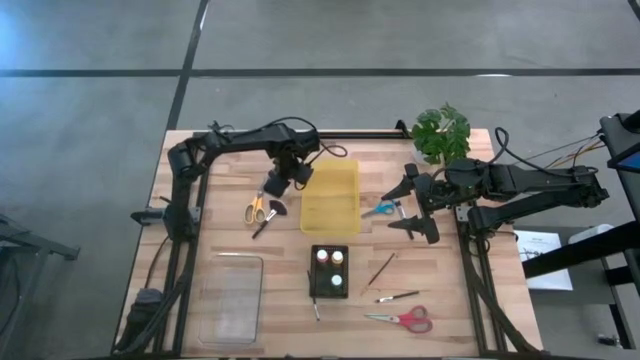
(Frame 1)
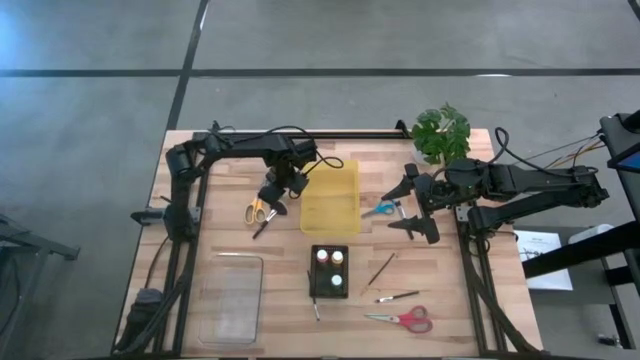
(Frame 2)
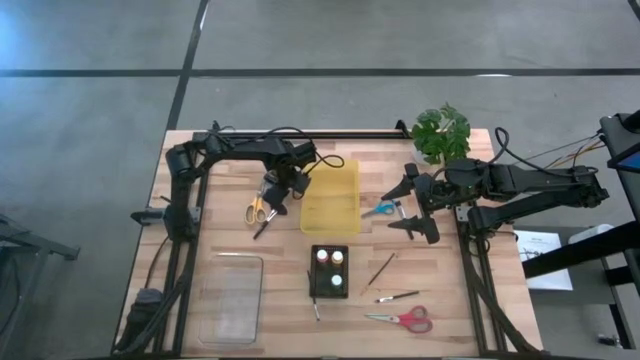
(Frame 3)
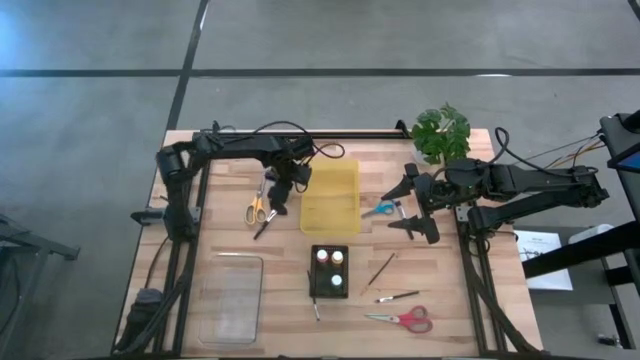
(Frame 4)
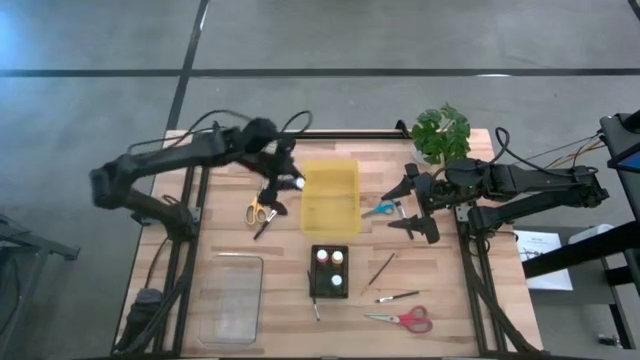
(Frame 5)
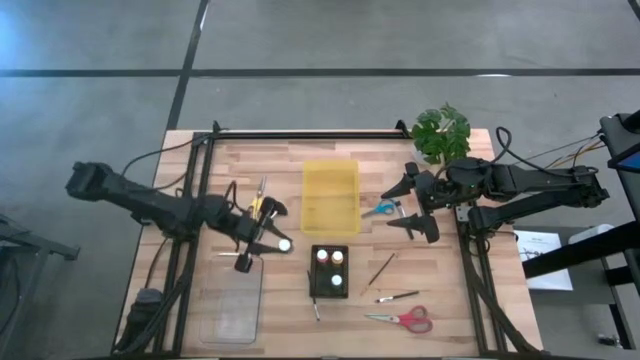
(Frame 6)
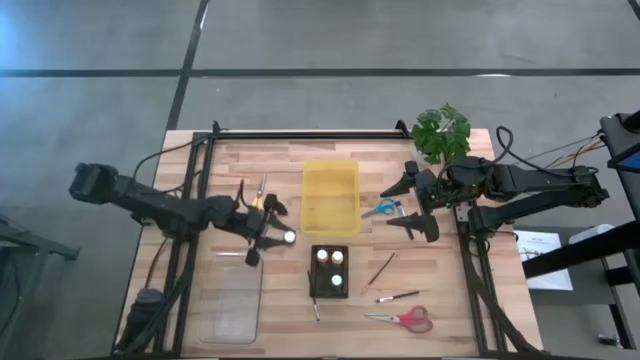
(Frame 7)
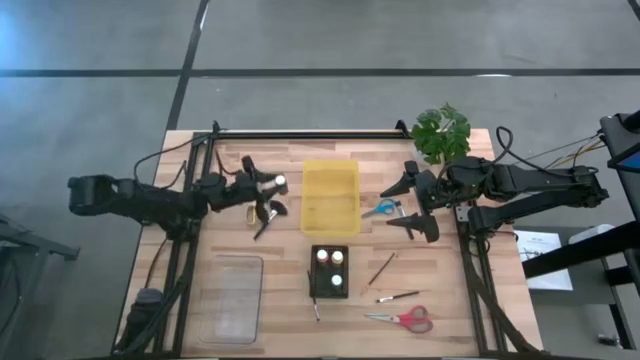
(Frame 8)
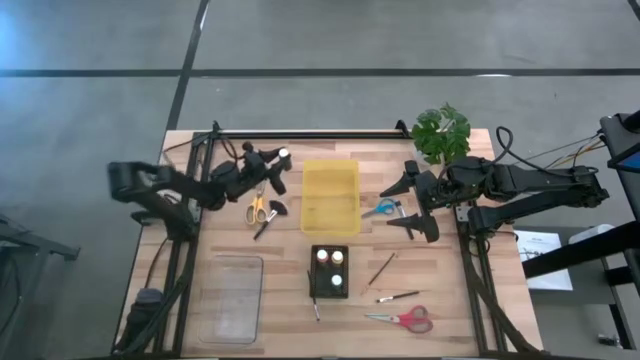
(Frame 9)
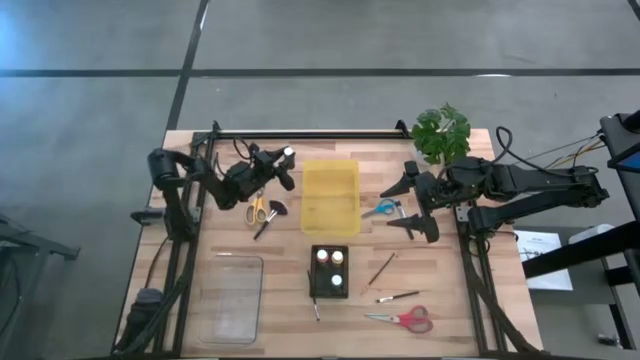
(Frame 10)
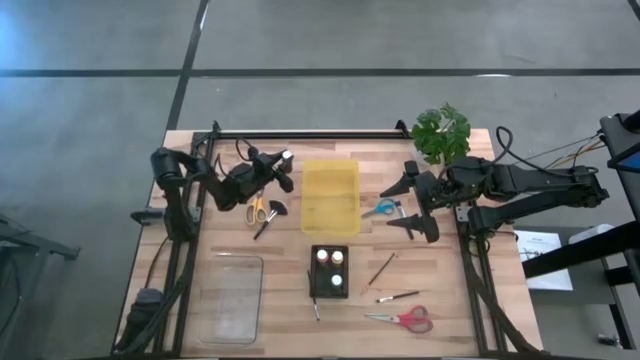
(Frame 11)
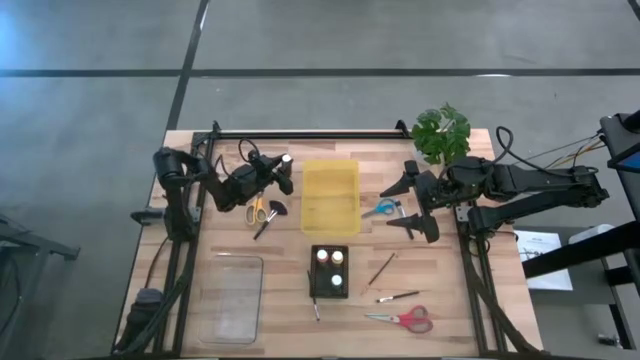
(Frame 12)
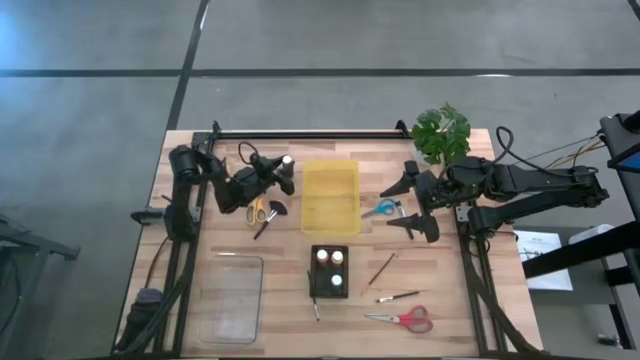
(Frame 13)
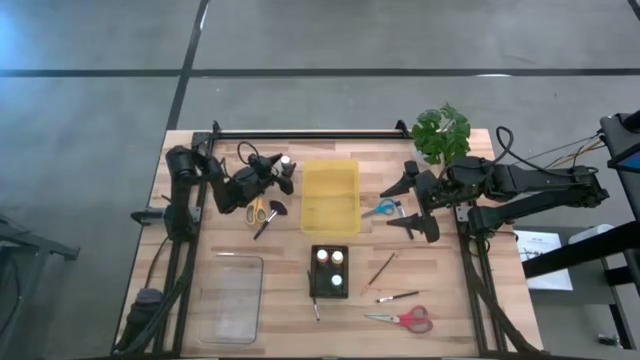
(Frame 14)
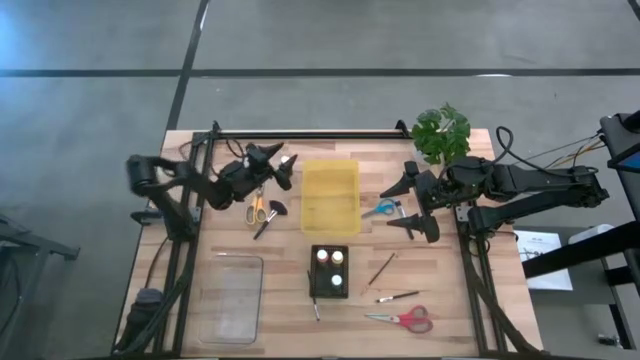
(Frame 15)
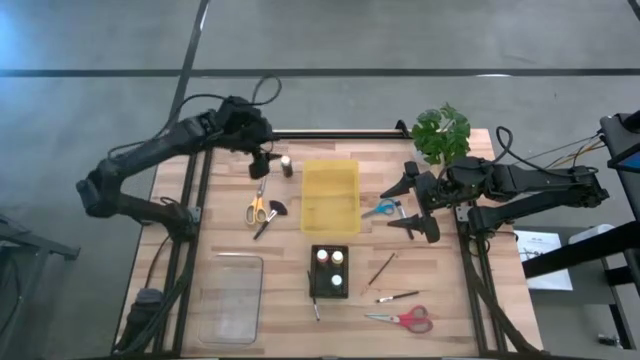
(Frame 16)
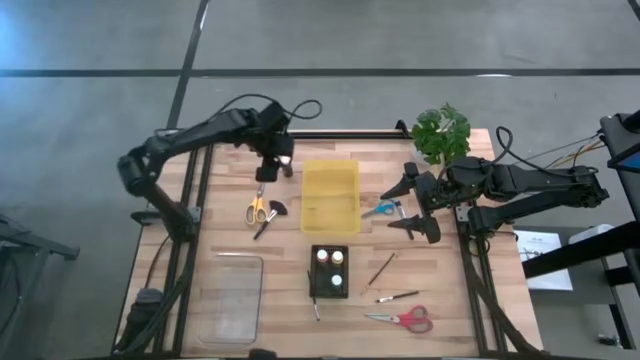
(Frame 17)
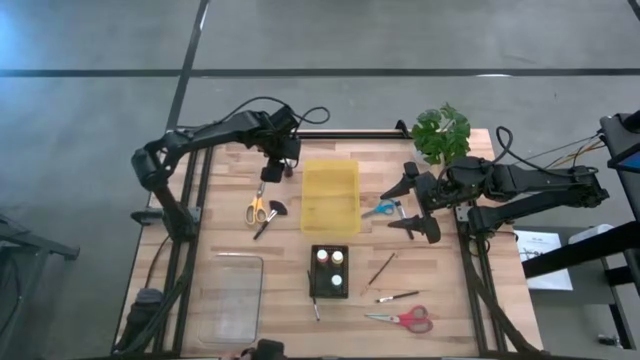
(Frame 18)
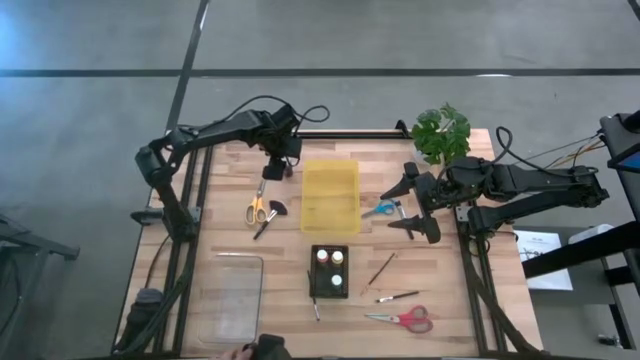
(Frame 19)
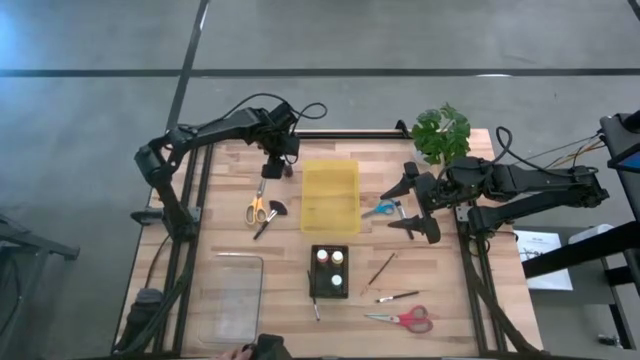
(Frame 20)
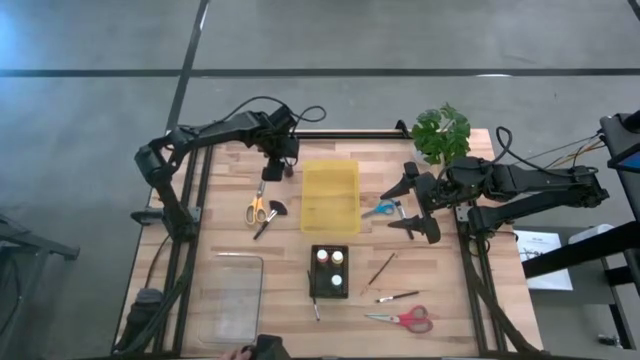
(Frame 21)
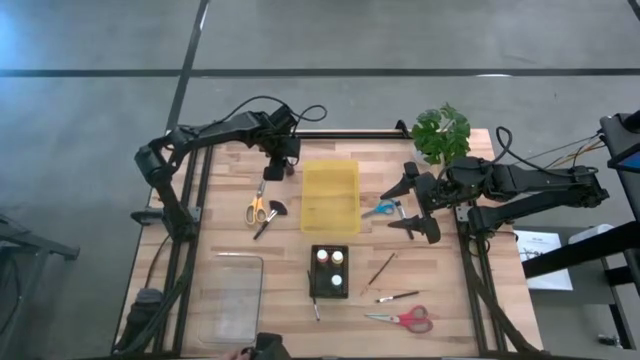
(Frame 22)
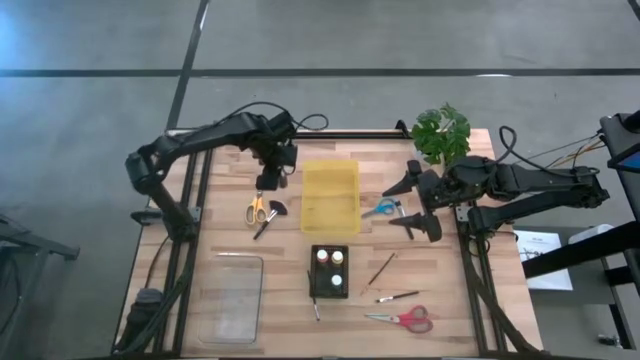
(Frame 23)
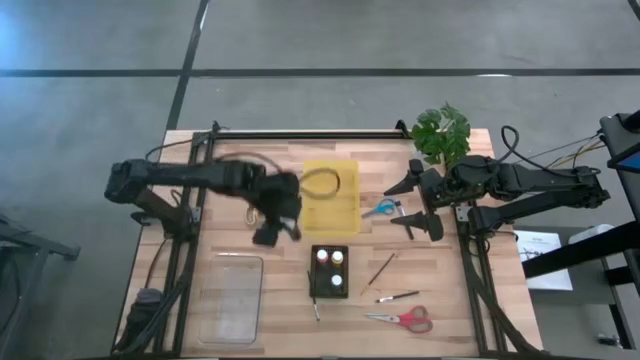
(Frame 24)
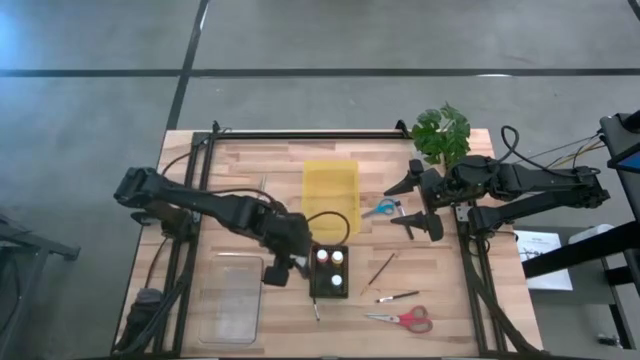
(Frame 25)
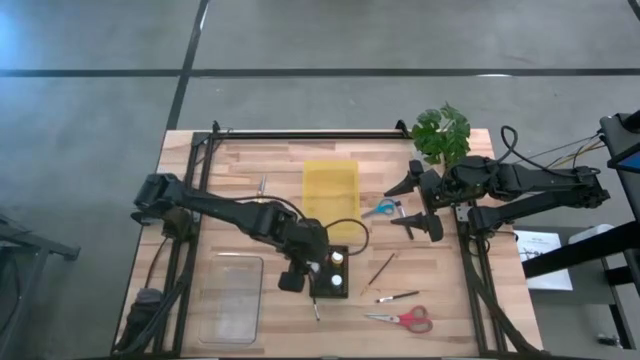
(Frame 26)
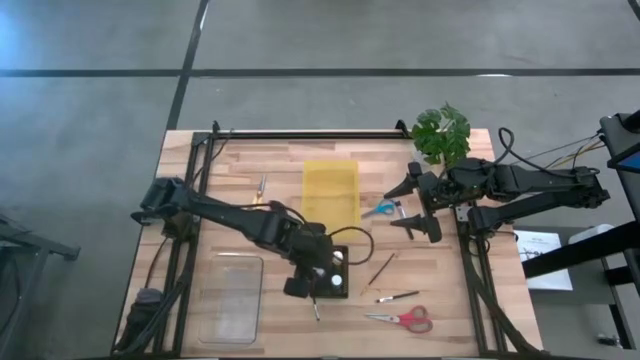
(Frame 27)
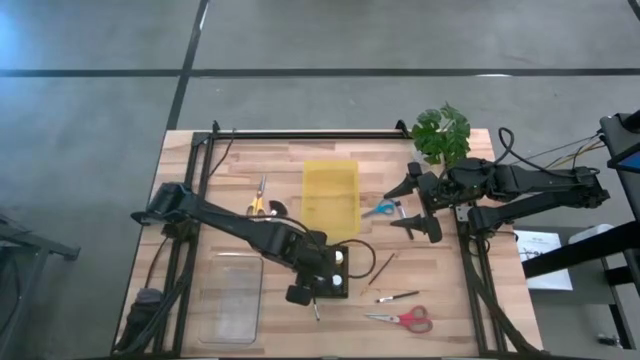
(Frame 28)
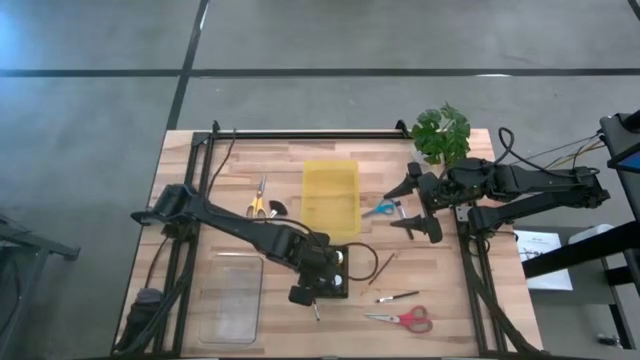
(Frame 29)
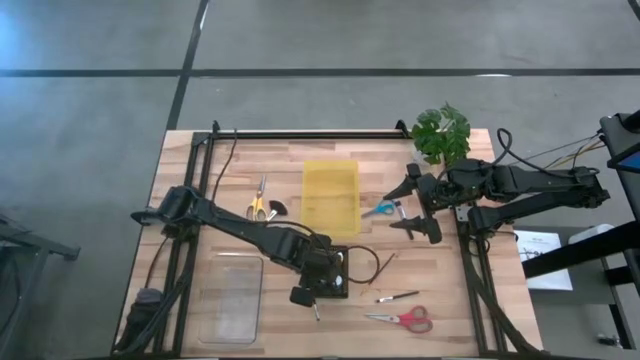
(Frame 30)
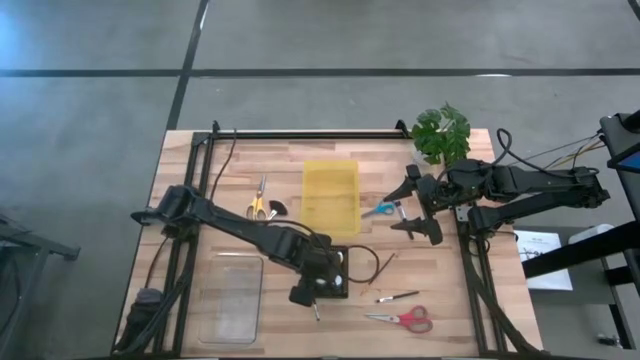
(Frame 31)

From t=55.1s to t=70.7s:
Task: Pick & Place Paint Supplies
Put the purple paint bottle into the black bin

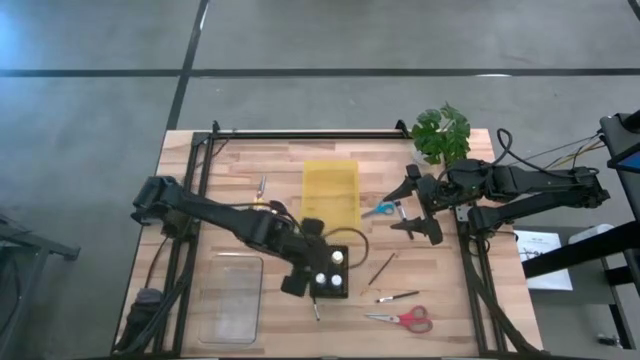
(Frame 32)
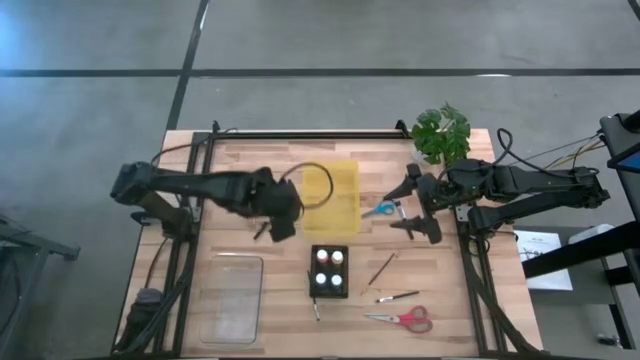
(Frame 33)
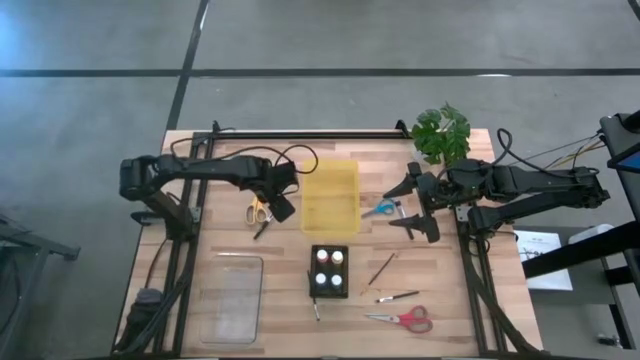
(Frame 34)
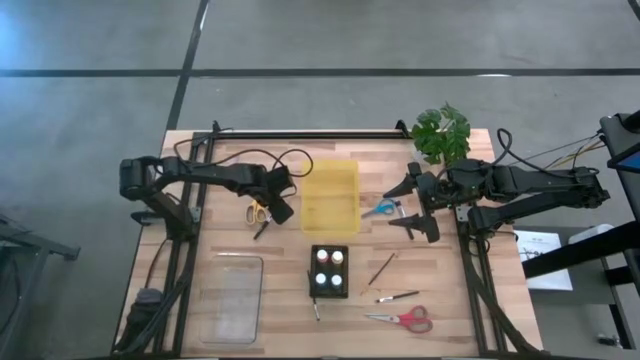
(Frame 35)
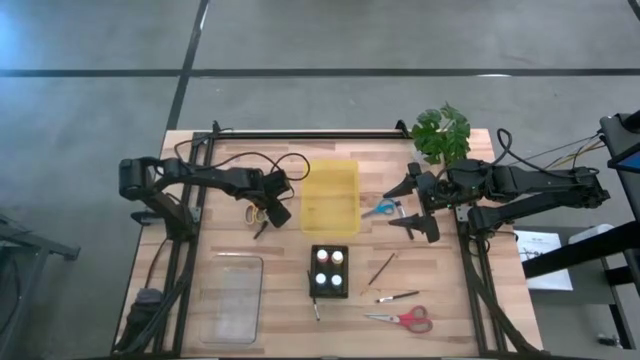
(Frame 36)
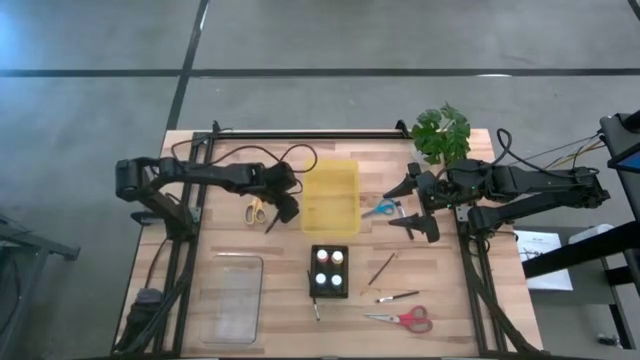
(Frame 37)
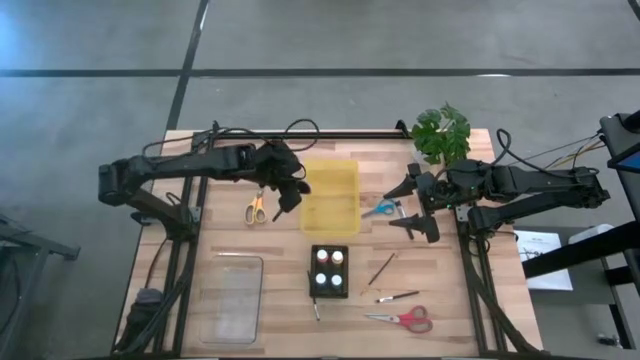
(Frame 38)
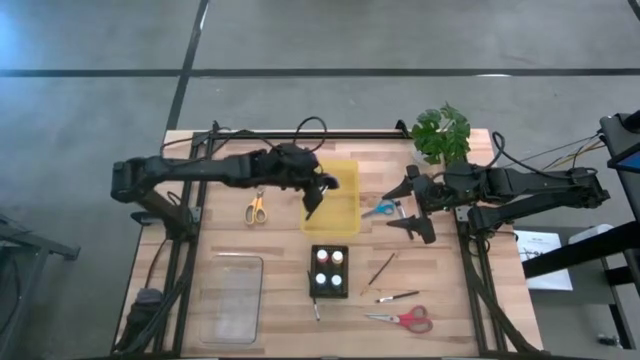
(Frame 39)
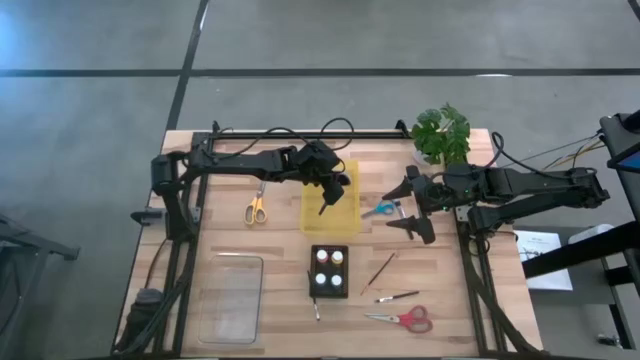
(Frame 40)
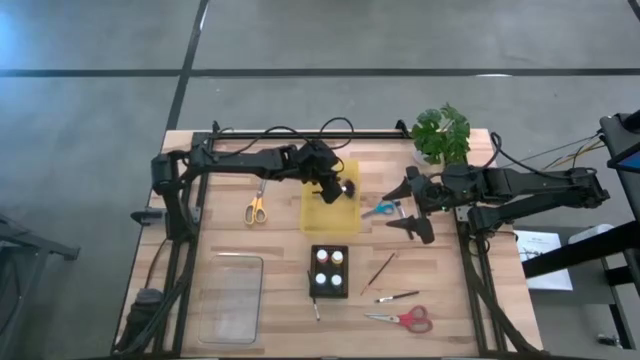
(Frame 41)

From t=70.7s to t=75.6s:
Put the silver highlighter brush into the yellow bin
